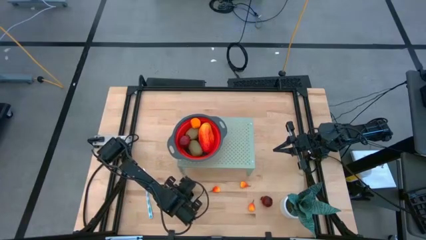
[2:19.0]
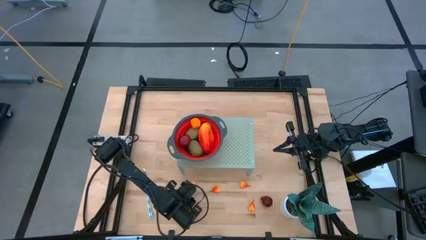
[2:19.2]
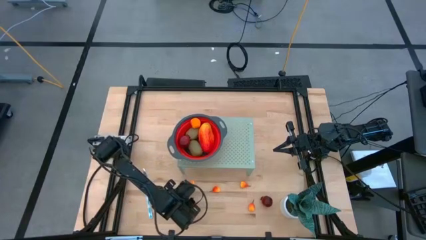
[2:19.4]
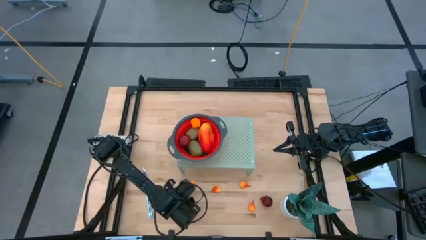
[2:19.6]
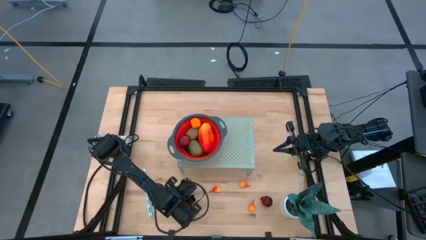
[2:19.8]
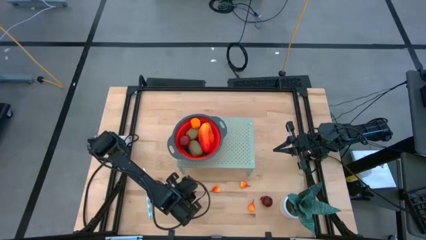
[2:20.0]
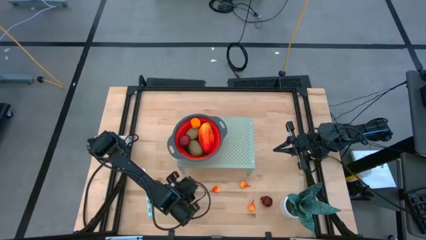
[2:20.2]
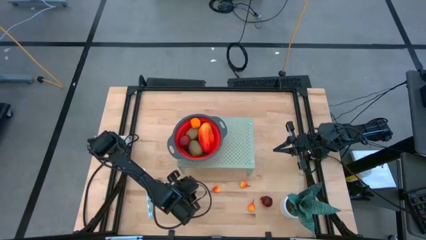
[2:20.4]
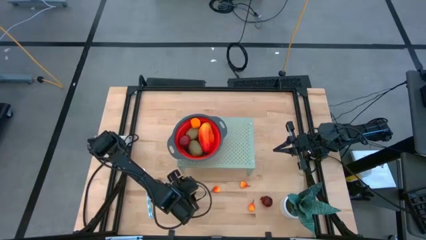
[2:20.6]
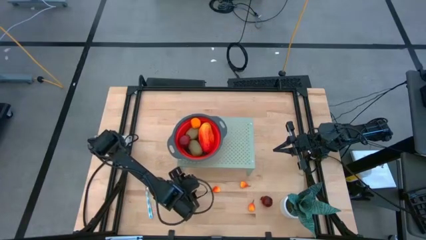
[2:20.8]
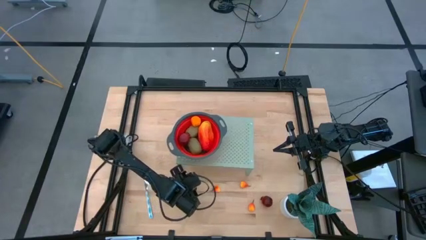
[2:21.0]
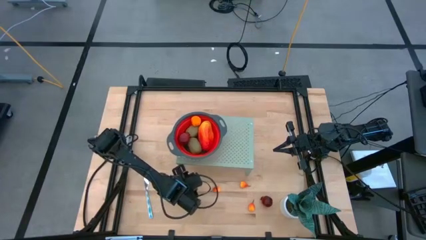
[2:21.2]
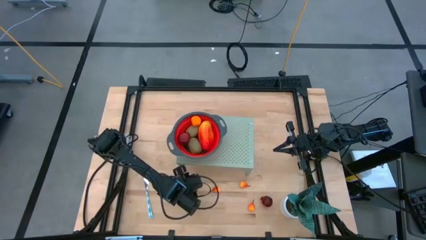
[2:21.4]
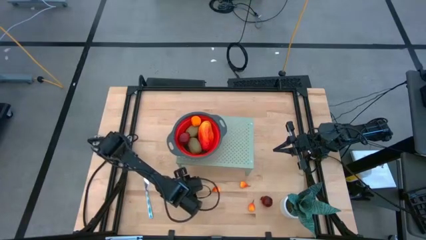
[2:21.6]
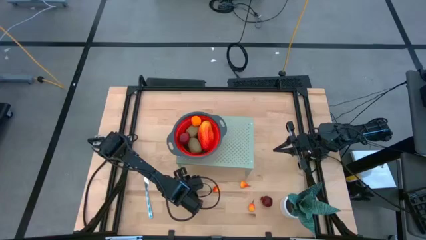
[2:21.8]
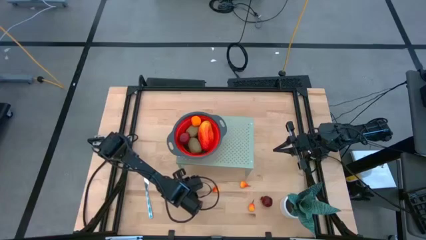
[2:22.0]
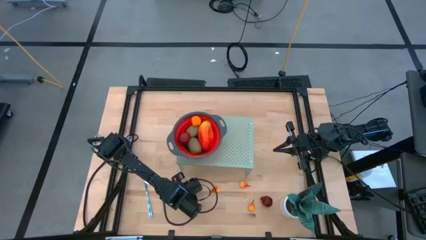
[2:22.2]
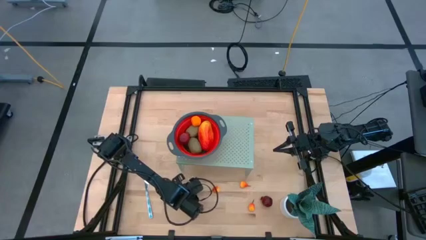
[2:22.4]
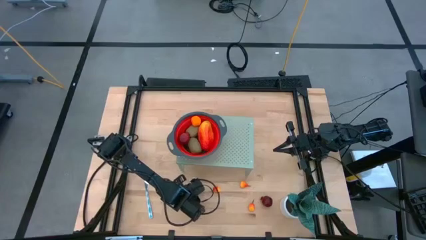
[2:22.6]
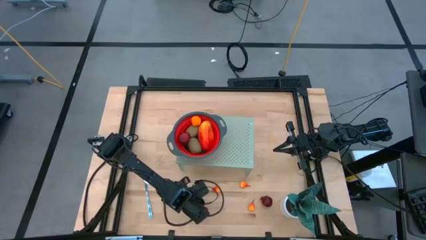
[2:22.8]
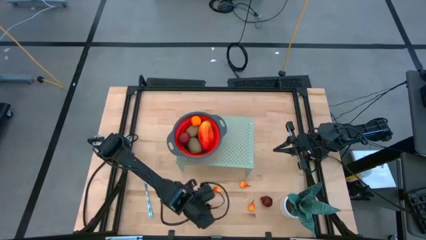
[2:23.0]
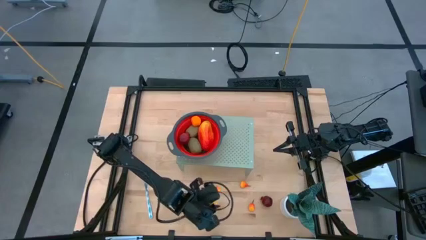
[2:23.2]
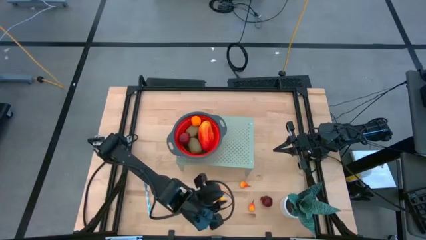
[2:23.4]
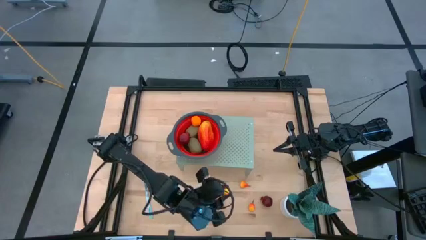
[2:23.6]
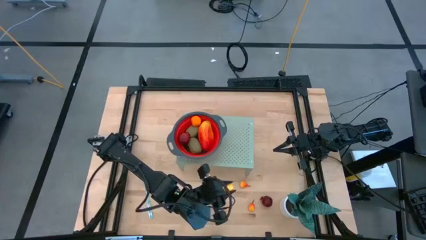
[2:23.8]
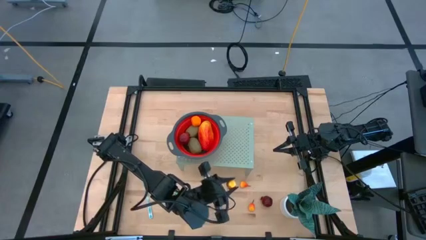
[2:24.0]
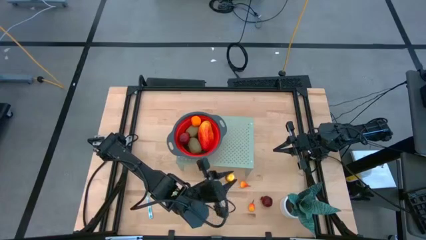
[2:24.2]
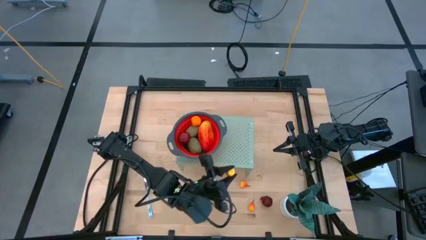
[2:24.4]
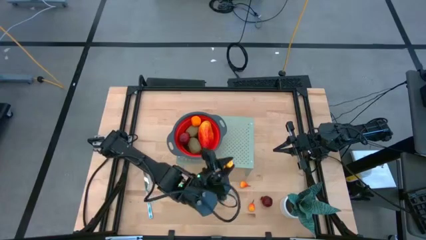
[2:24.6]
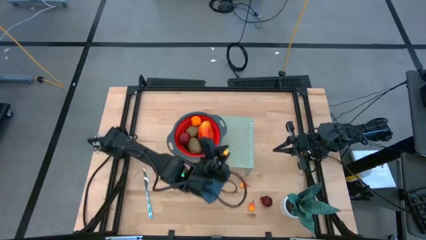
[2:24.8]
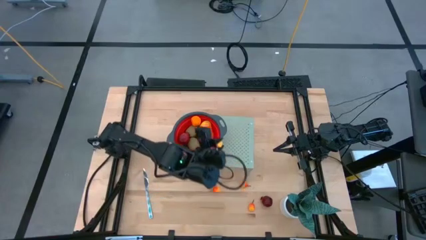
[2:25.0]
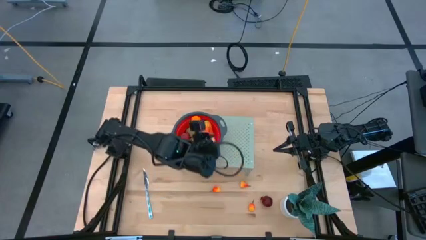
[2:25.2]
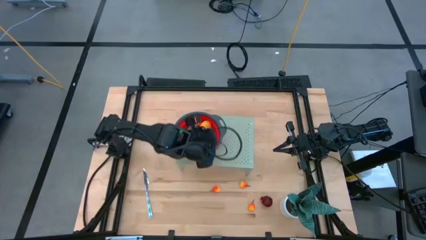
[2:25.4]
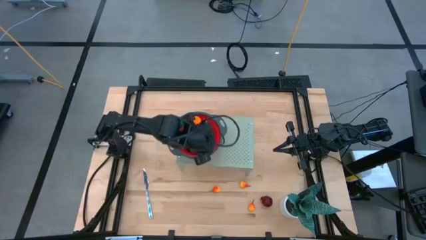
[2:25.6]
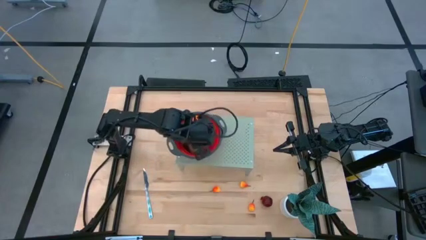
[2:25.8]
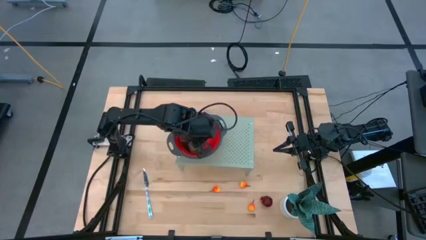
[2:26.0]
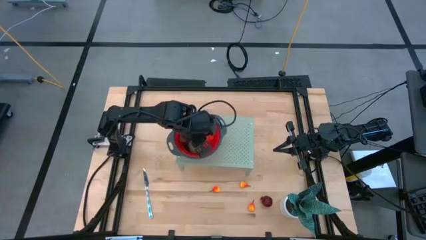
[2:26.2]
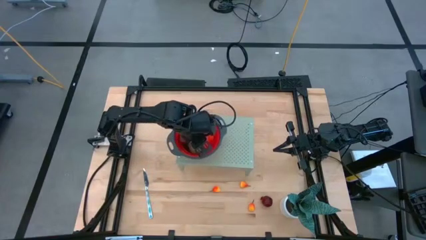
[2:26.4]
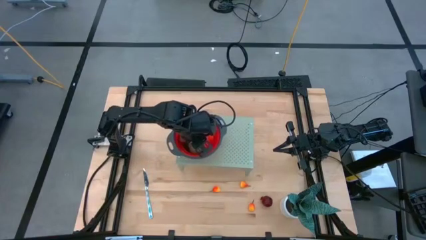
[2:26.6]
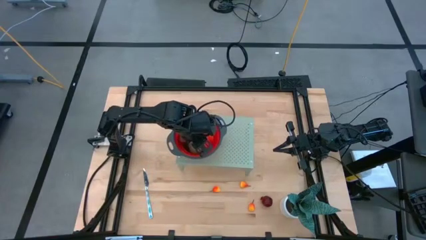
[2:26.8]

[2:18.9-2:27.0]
Task: Pick & Place Fruit
Put the peach fruit into the strainer

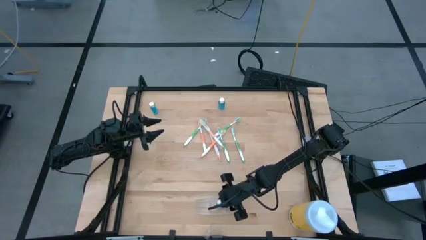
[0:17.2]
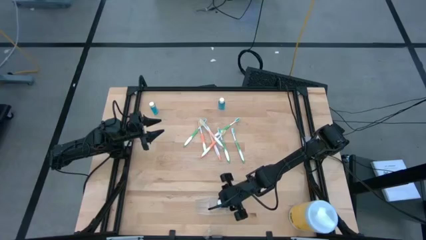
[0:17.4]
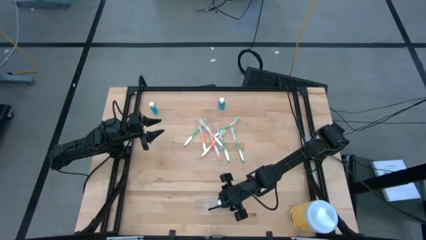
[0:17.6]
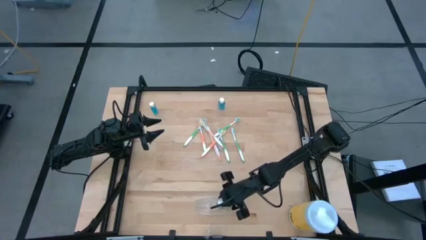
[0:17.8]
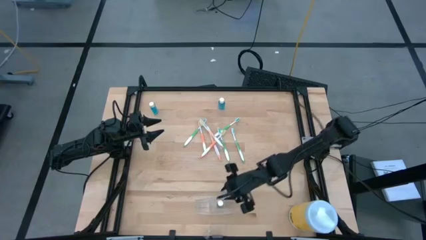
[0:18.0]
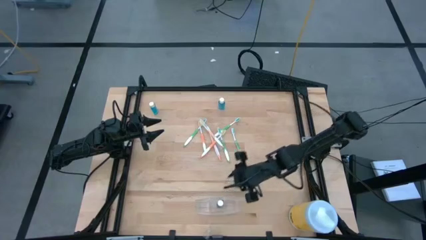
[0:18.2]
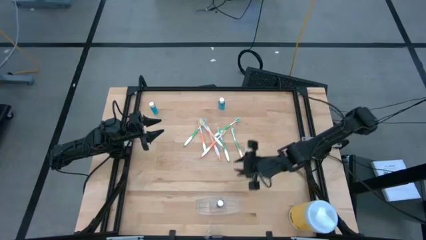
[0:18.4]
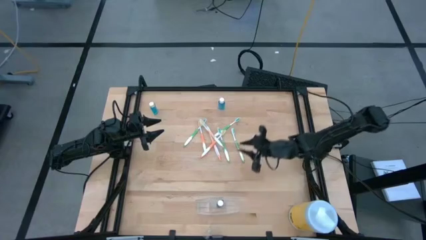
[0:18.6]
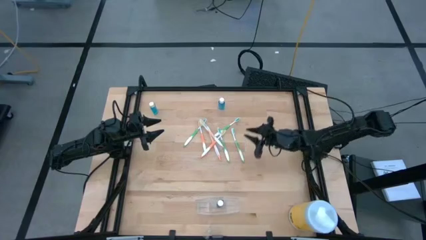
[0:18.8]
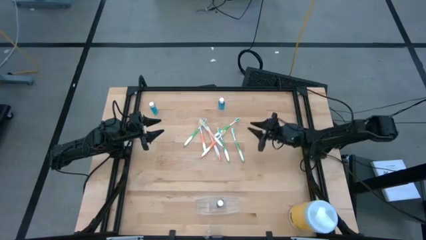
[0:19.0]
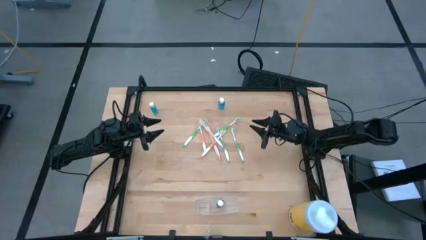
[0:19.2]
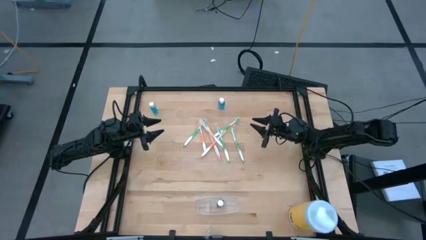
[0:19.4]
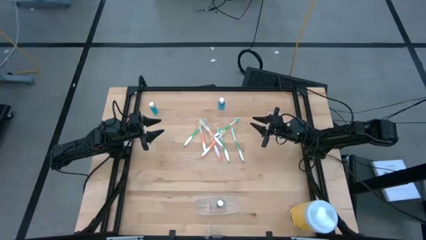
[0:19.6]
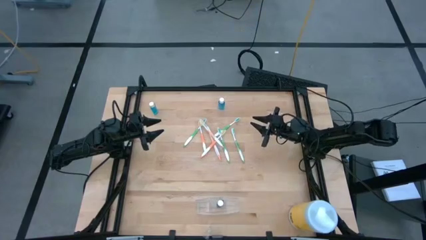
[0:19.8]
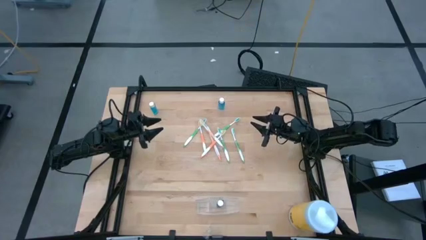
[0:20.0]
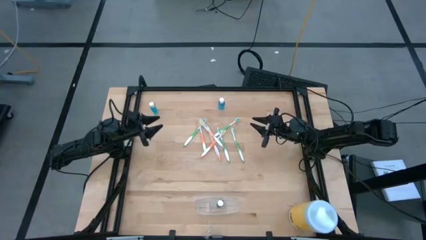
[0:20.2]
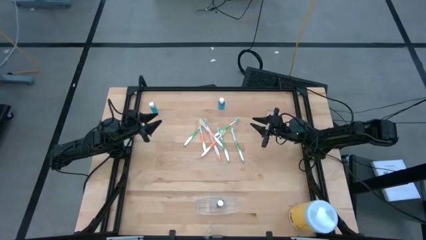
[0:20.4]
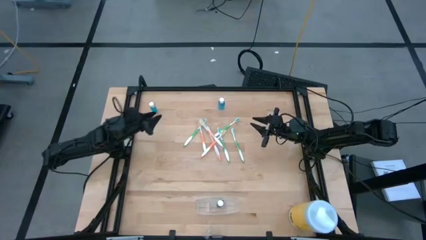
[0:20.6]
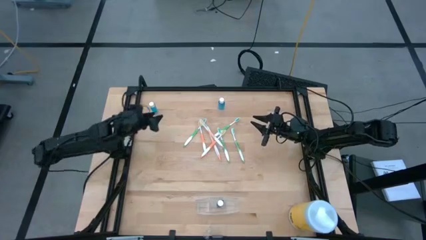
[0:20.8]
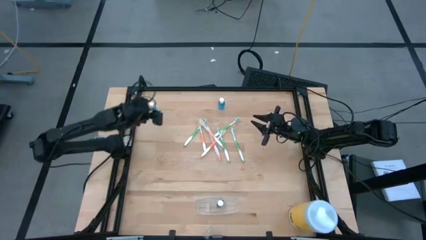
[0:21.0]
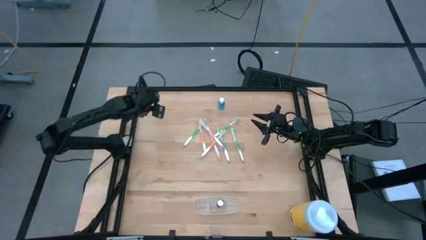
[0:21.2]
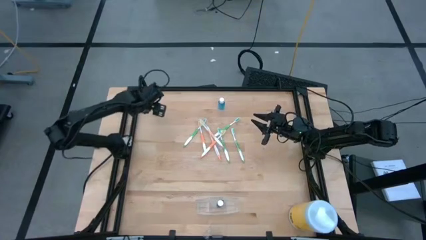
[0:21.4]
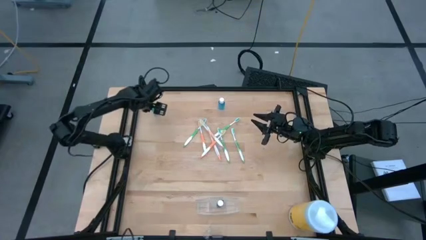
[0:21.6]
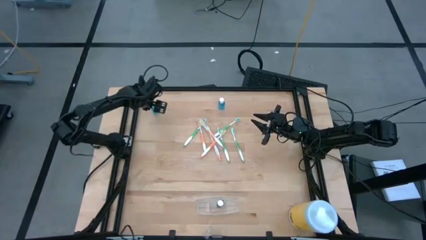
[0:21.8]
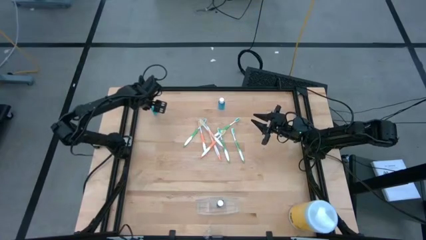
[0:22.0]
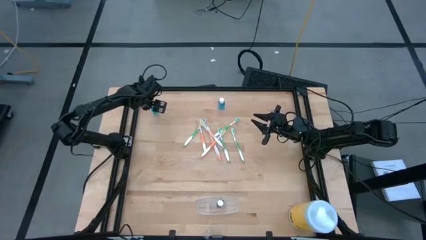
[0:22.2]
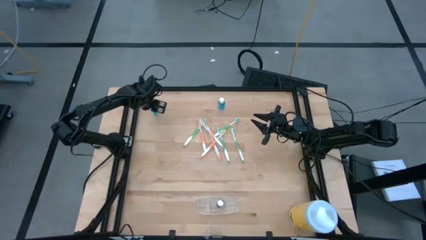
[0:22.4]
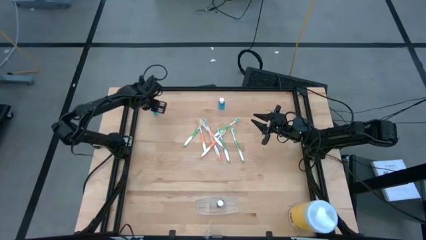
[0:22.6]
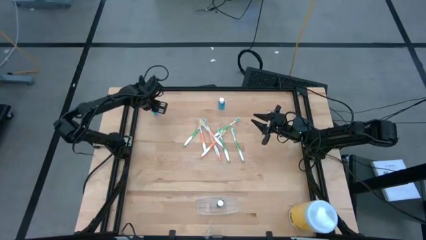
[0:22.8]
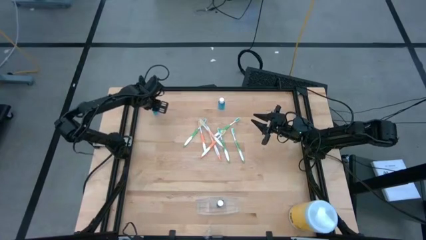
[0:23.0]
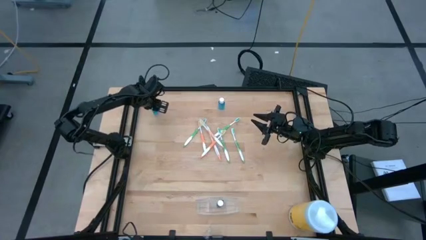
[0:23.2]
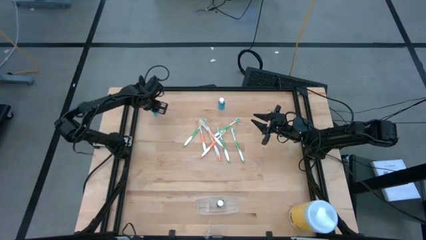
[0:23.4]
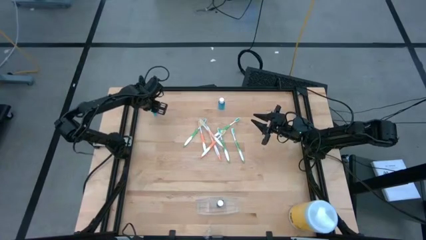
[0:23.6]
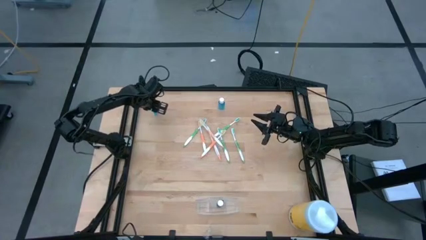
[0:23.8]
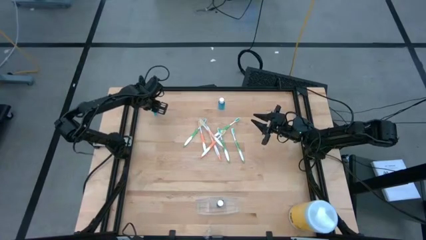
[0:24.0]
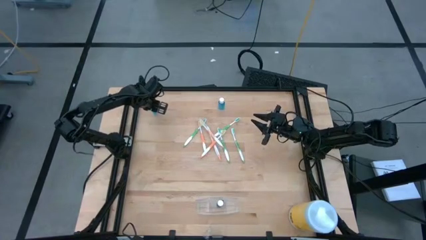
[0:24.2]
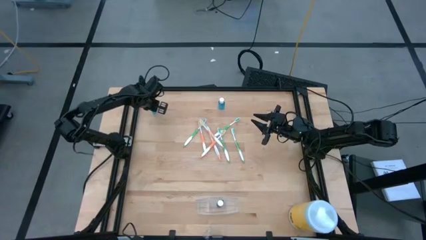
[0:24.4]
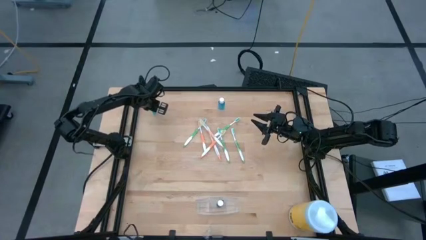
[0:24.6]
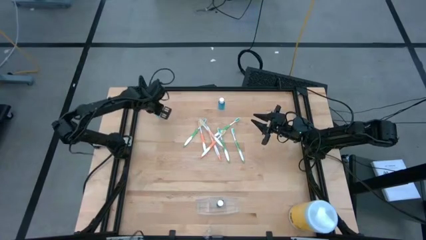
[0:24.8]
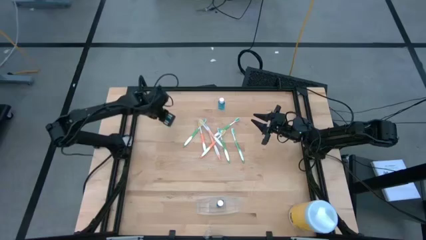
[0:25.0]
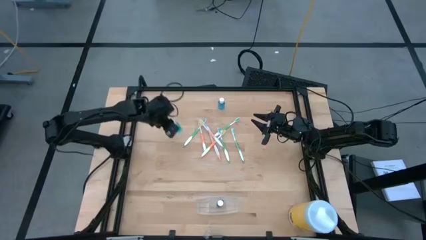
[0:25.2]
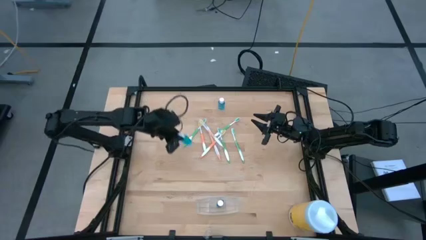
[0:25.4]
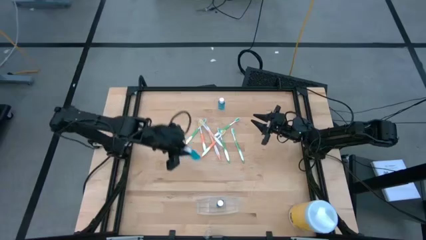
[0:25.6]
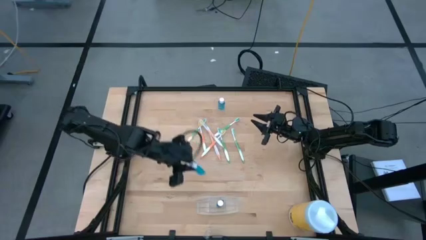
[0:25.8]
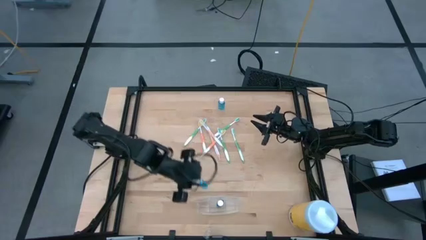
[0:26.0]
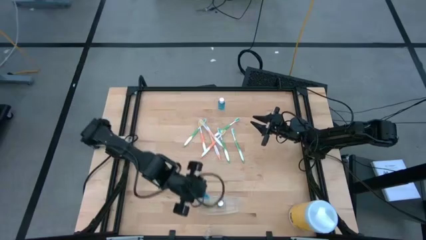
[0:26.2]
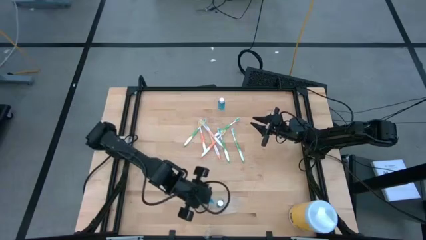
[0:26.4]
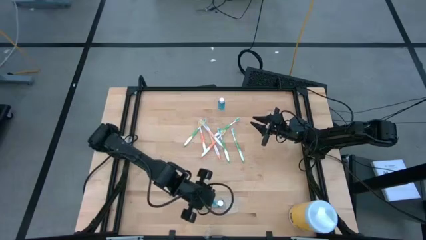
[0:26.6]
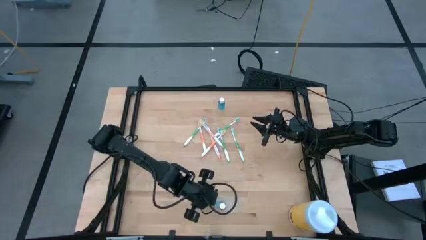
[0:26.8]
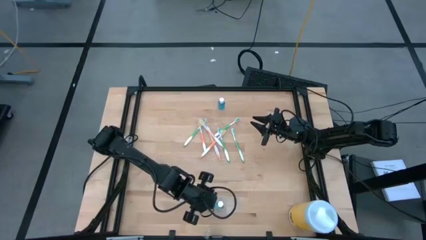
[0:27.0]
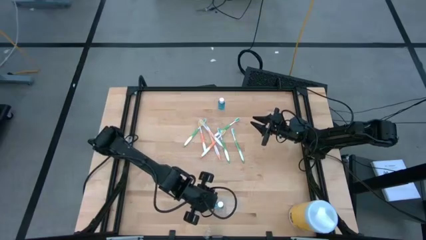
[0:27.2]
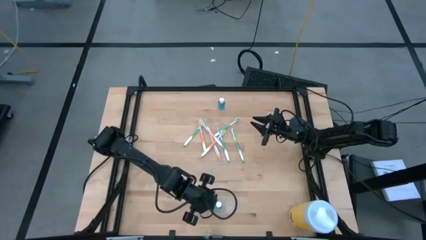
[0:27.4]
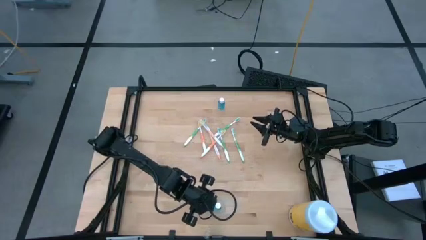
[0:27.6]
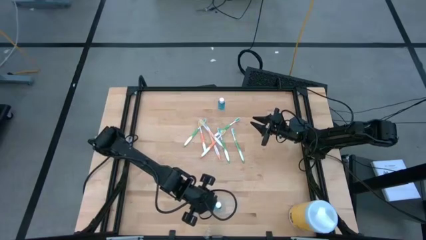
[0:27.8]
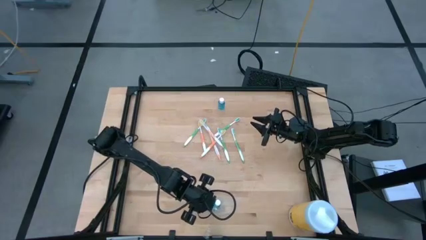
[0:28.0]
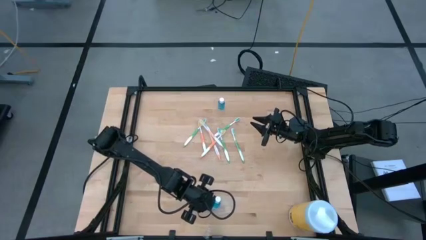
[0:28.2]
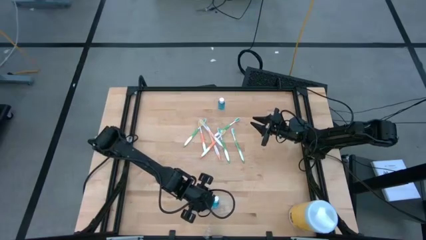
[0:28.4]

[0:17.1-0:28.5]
Task: Pick & Place toothbrushing station
Put the blue mouthwash bottle into the transparent organizer
